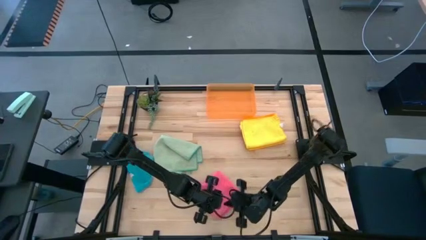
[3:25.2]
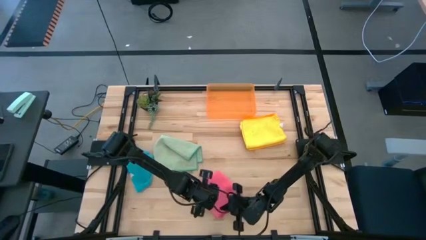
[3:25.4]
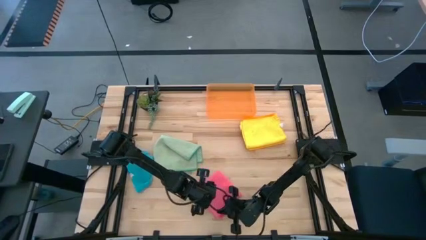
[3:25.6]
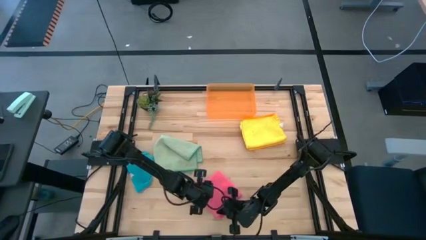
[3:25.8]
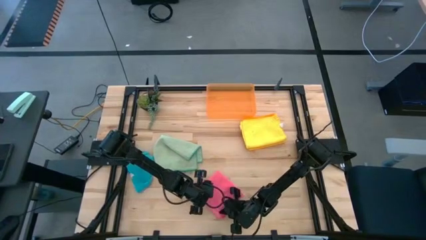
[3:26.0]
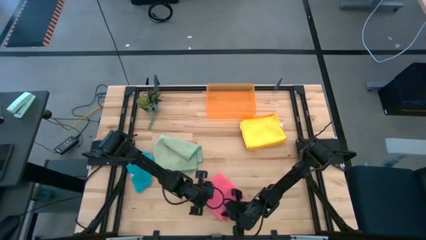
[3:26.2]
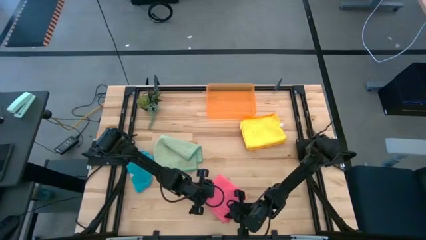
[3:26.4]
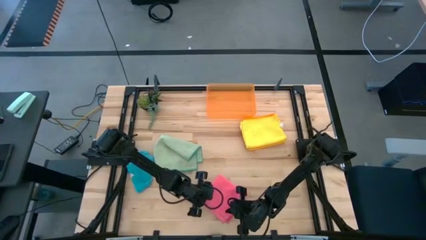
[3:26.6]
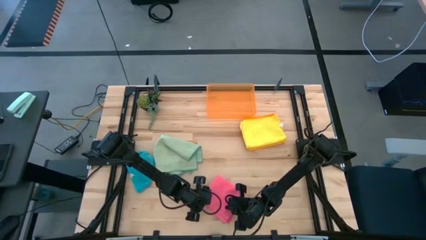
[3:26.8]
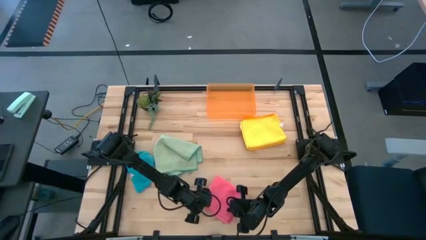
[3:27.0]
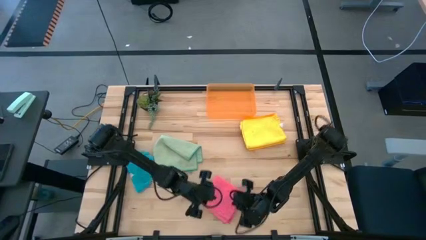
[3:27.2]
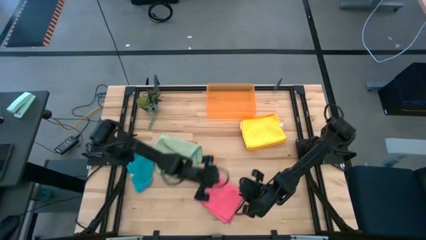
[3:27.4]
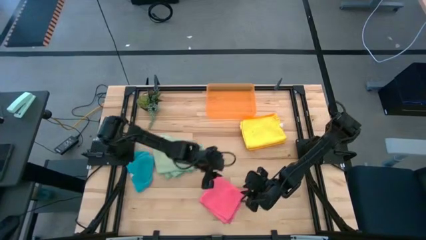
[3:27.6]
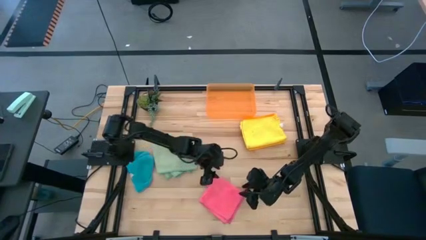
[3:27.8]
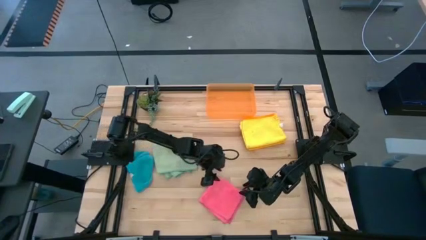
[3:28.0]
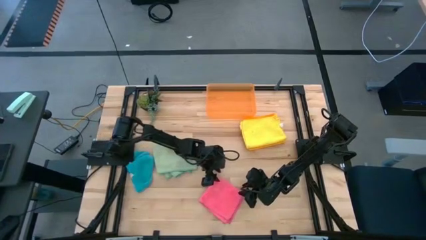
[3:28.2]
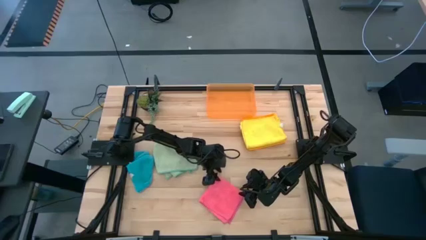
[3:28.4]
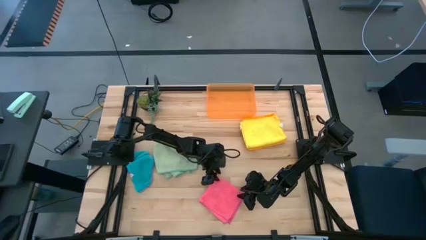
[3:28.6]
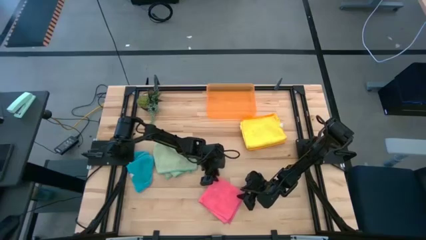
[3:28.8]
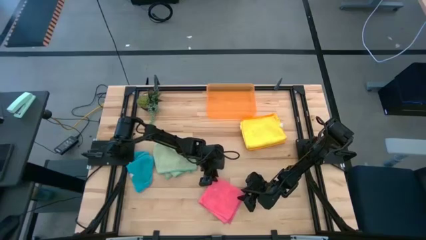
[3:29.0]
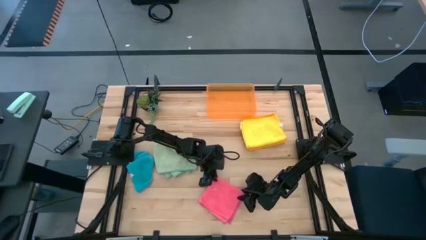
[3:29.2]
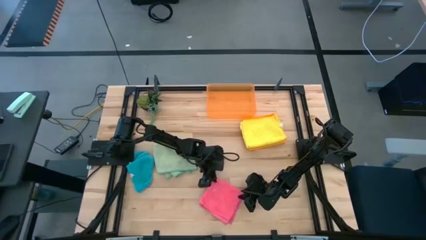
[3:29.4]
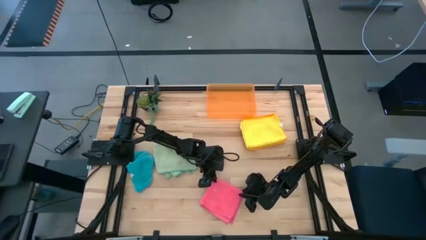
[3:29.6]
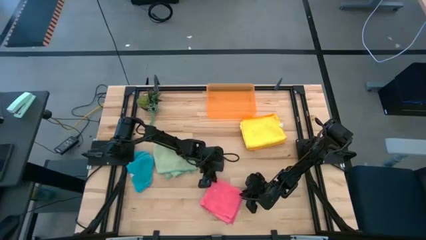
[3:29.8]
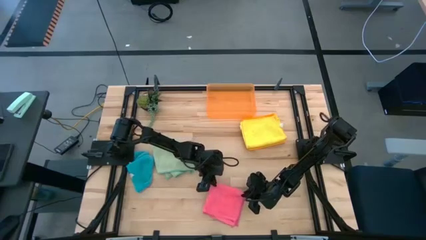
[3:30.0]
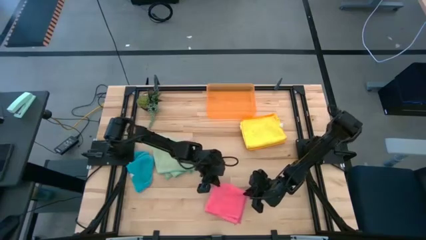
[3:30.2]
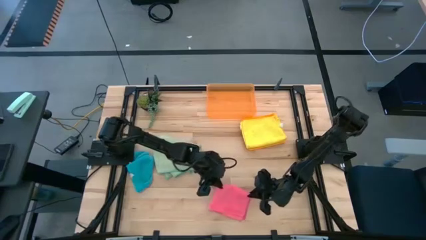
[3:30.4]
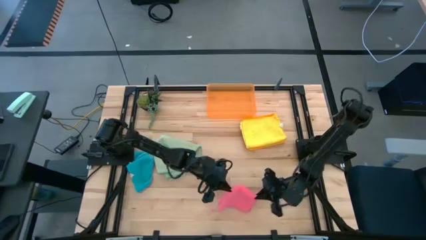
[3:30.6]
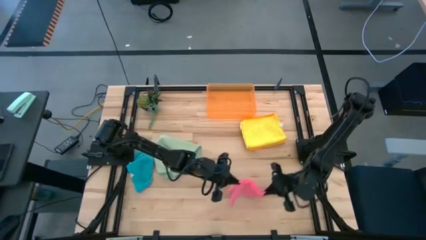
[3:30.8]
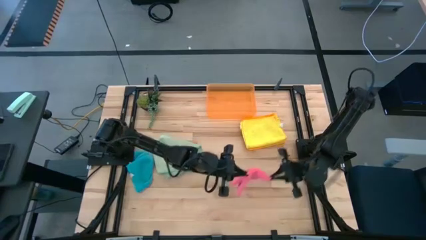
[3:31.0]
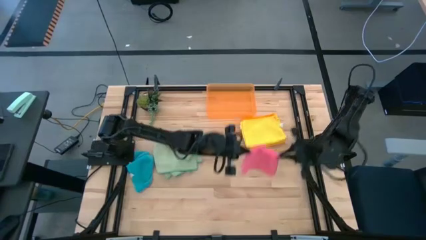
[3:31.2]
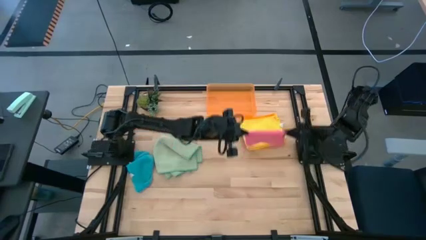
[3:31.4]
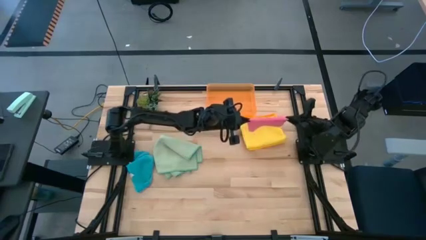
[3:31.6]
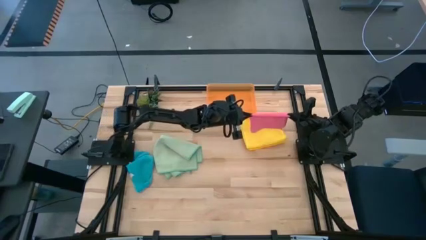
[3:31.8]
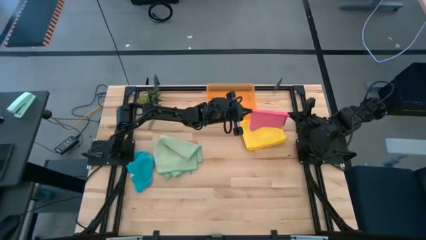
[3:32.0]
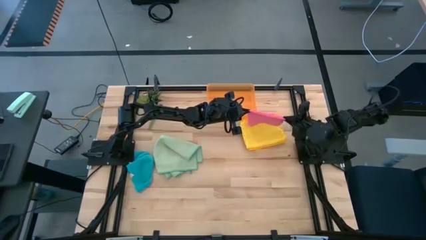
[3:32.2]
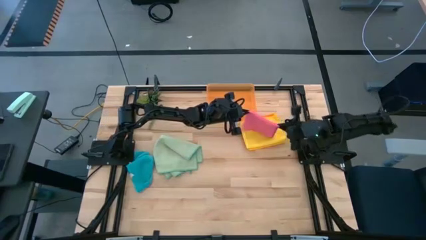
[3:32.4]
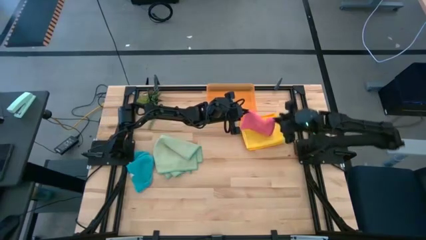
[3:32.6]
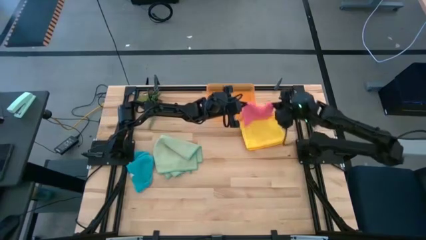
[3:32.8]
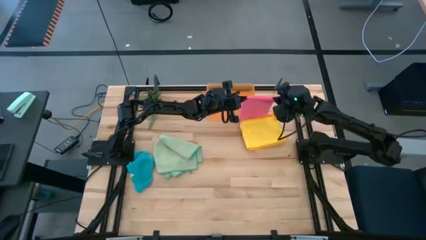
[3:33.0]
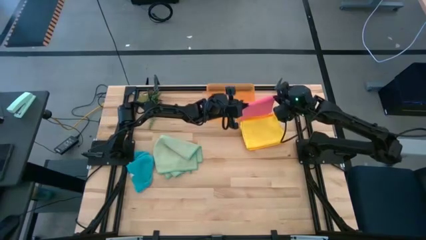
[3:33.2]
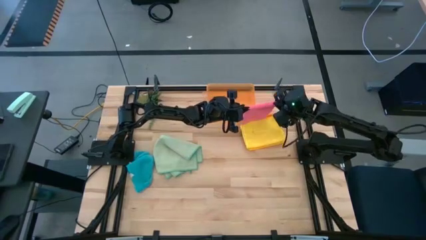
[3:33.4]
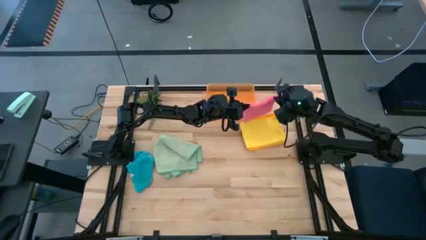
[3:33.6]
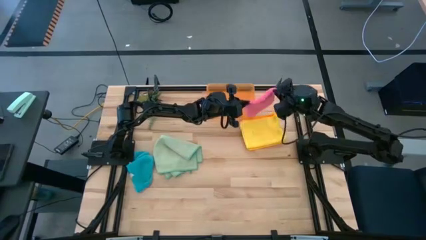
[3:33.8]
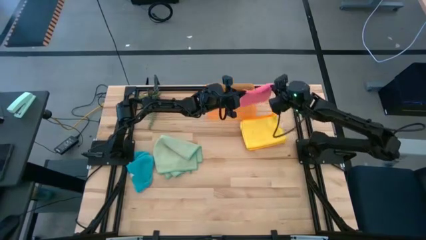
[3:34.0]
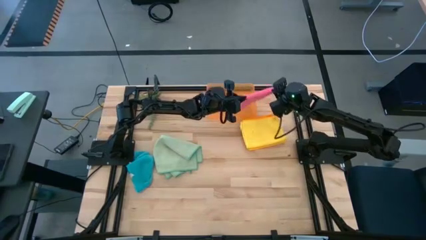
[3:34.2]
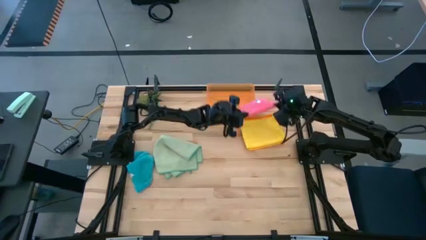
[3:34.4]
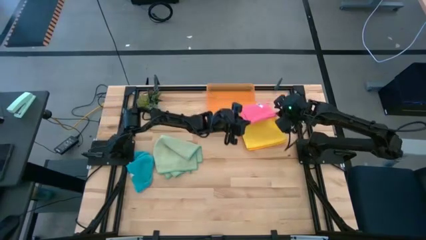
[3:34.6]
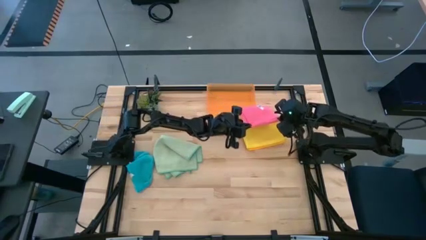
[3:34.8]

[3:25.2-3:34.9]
Task: Fold microfiber towels
Stack the pink microfiber cloth on top of the yellow microfiber cloth

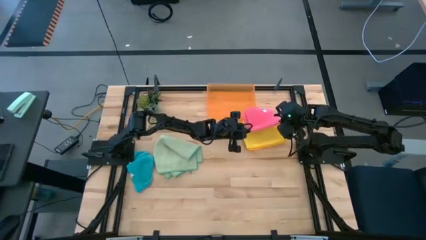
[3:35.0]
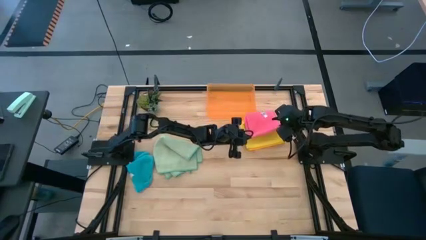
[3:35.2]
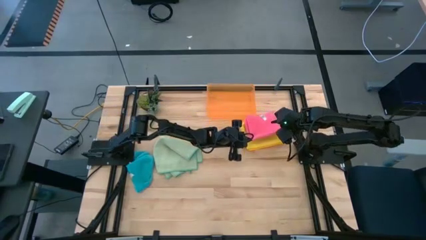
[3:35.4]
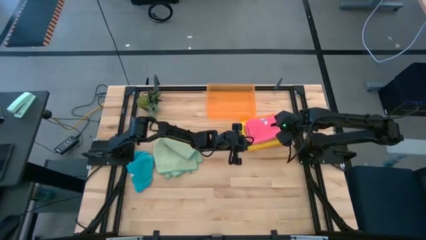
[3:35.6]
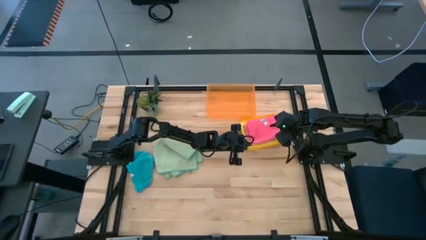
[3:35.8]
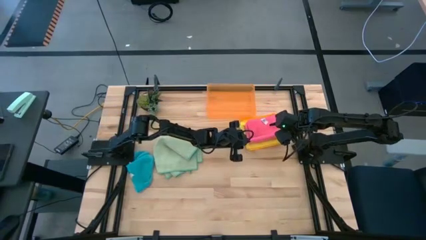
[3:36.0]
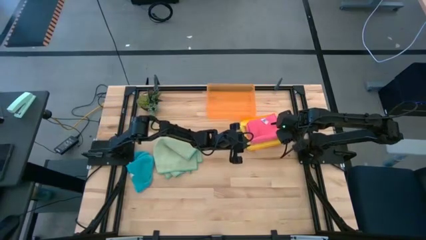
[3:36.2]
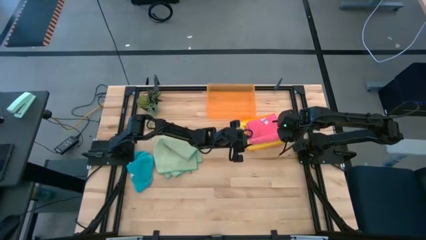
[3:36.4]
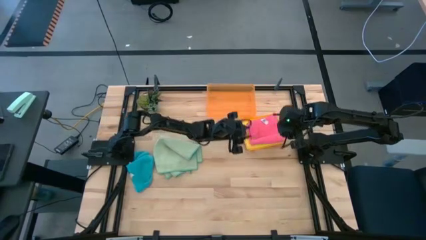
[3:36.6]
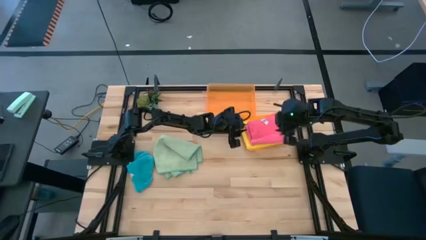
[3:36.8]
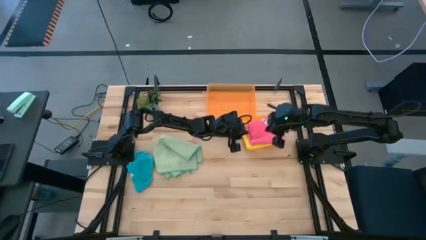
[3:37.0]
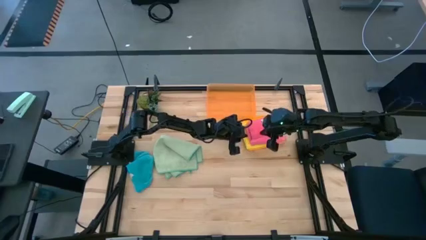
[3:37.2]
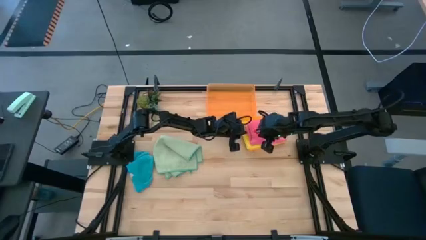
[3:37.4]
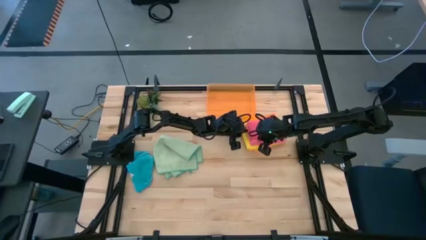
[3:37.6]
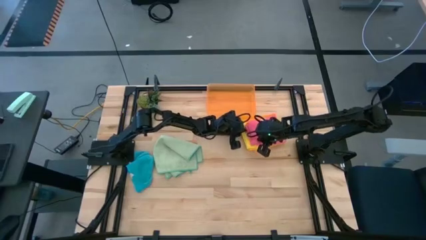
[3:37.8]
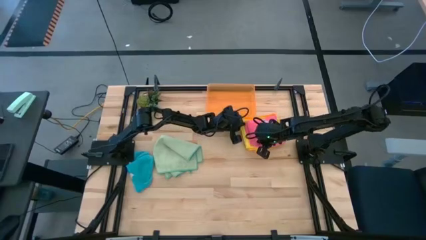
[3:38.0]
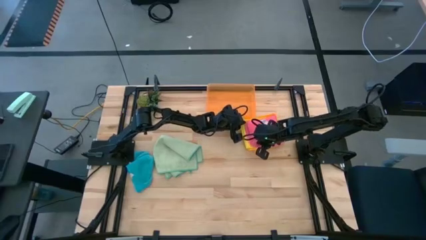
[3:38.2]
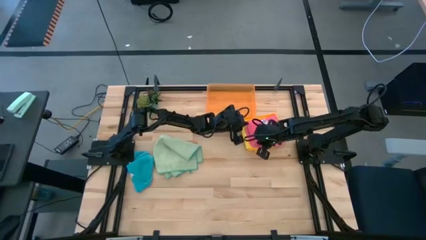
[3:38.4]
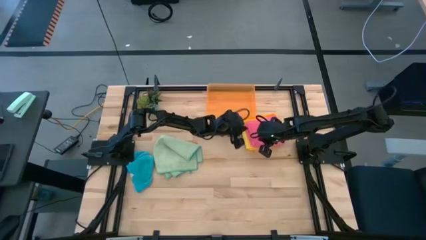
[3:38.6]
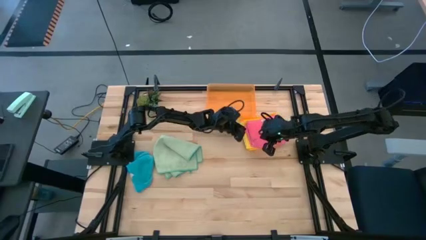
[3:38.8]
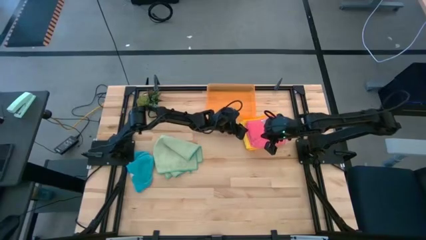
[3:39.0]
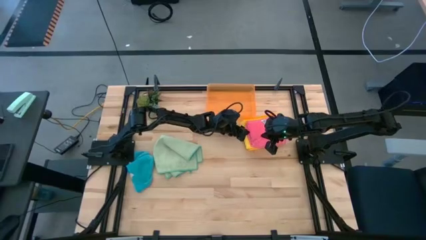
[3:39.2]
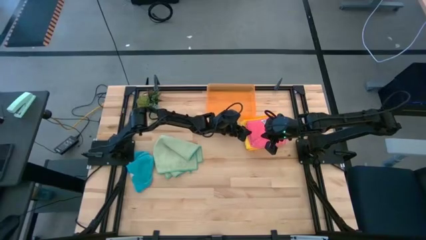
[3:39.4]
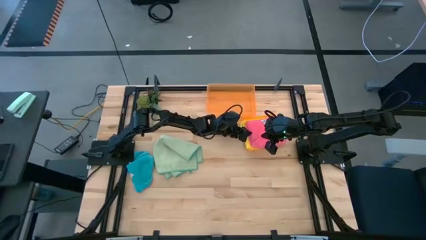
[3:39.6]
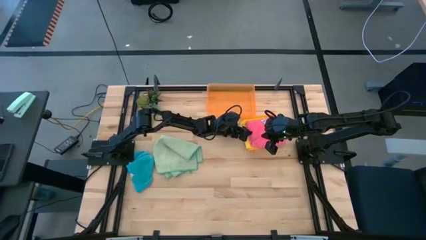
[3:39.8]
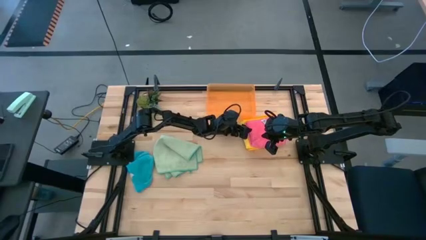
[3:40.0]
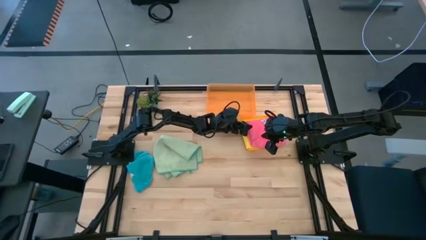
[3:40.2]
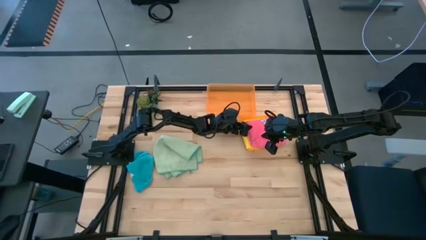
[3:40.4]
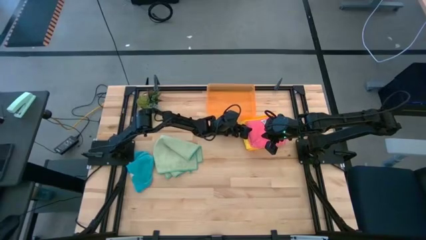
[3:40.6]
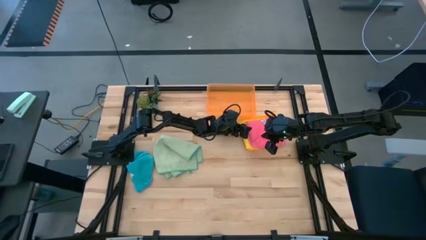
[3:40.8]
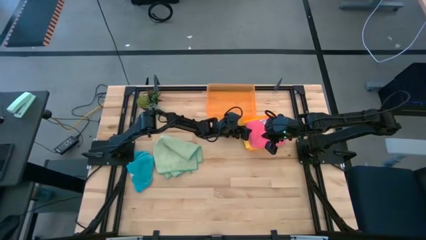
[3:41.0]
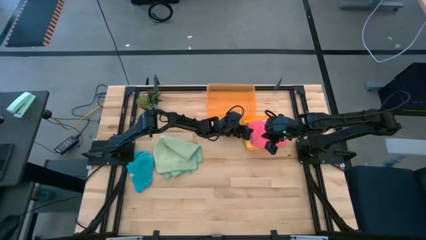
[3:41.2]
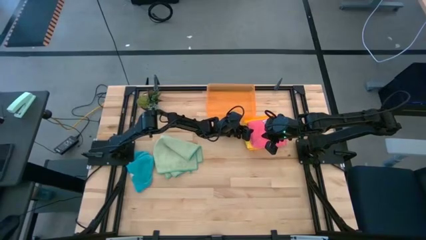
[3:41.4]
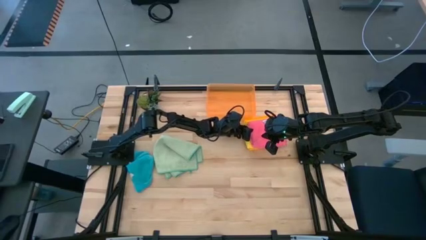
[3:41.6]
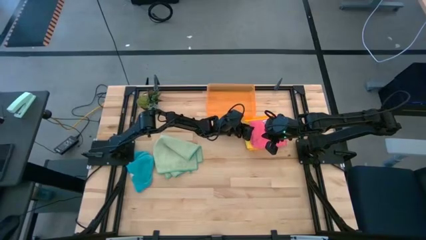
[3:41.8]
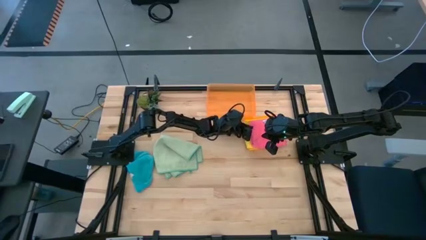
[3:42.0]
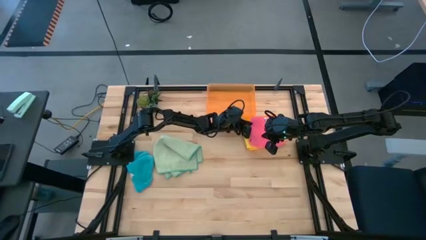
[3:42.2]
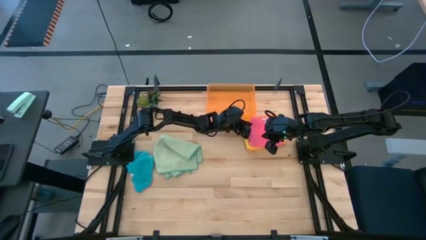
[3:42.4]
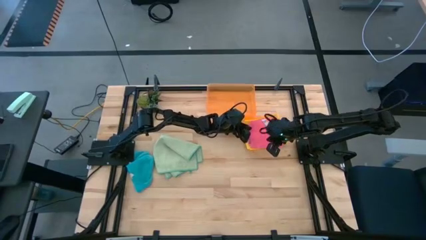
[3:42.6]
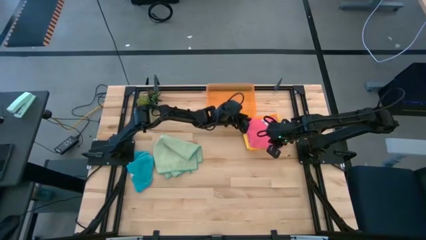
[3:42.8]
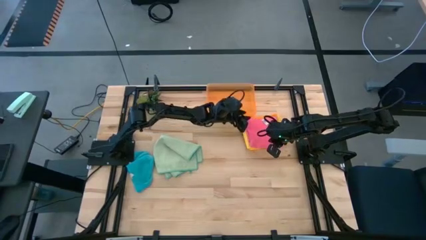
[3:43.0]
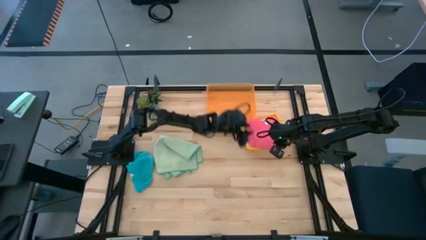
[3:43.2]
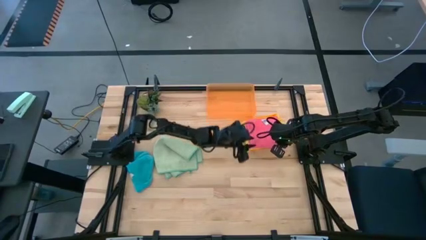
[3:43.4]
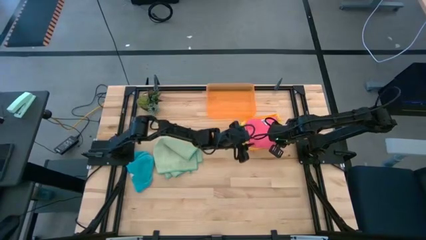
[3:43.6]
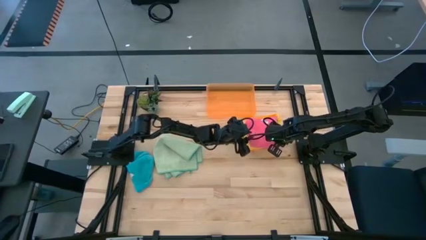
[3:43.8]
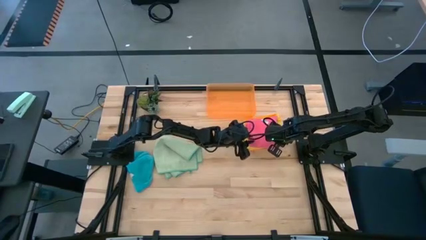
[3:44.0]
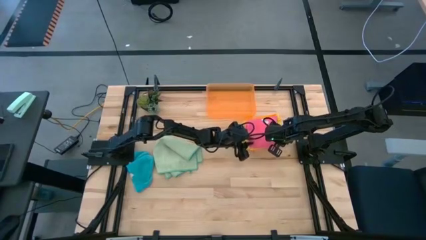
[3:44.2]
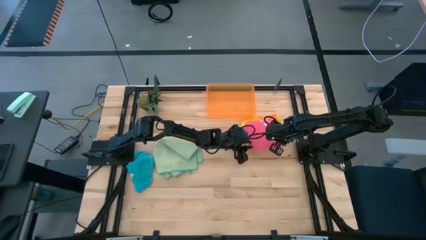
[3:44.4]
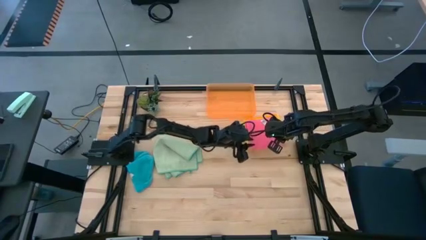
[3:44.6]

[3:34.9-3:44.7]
Stack the pink microfiber cloth on top of the yellow microfiber cloth
